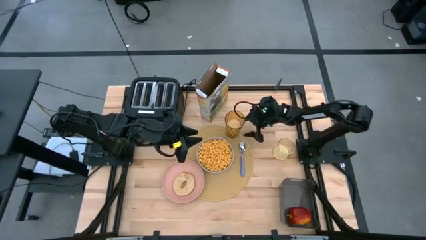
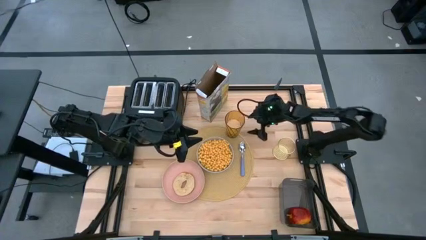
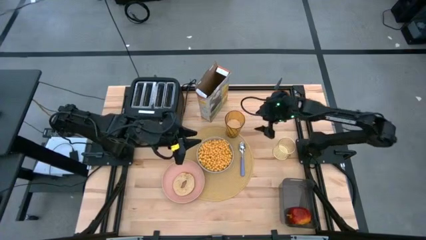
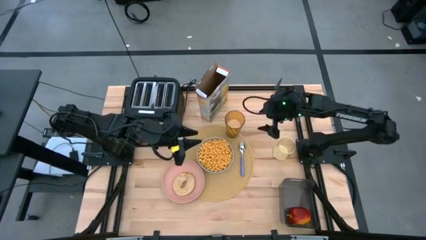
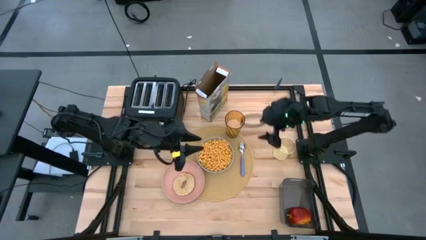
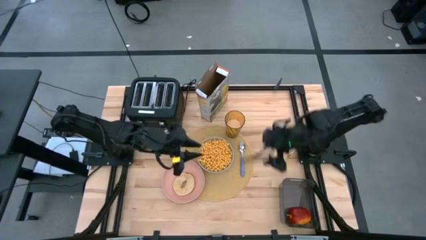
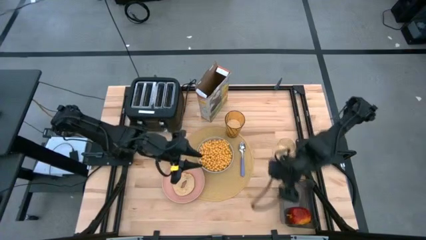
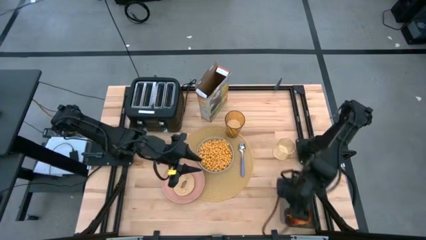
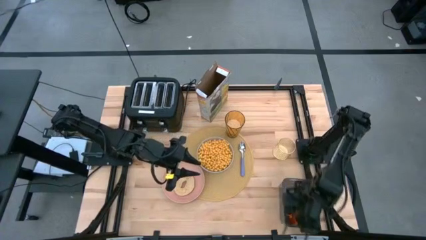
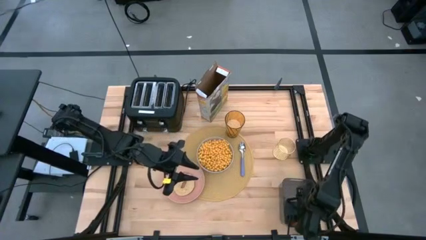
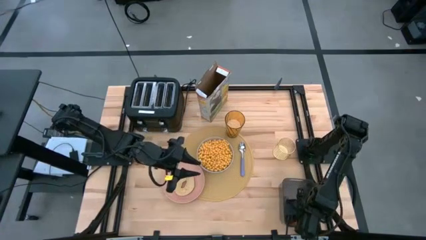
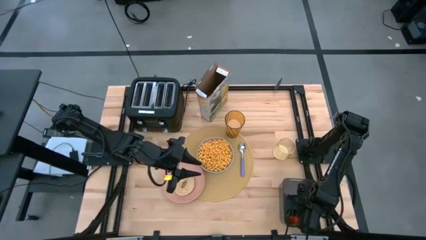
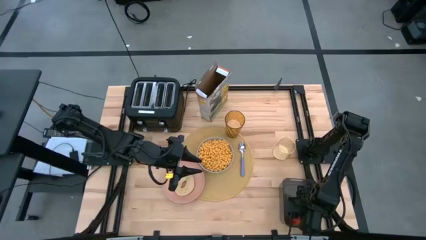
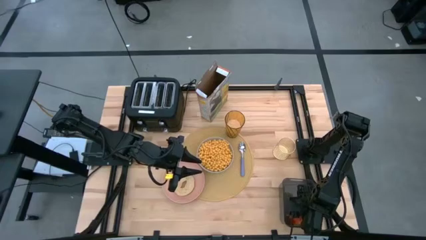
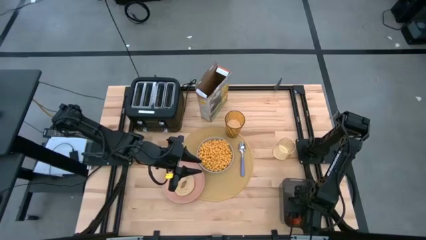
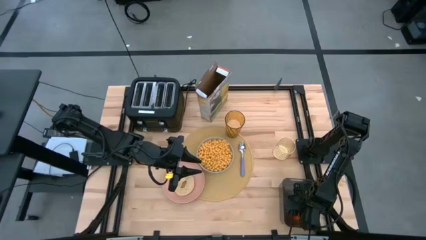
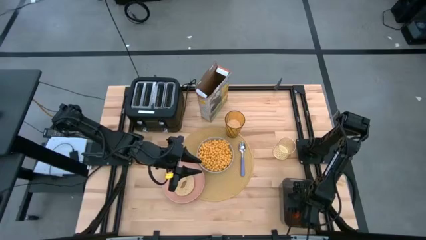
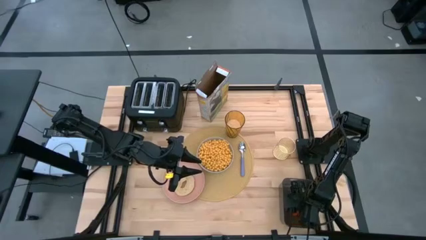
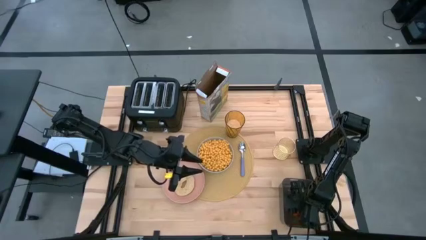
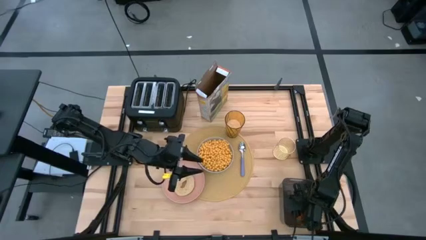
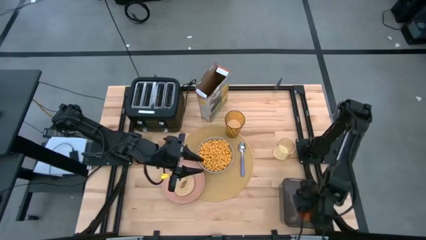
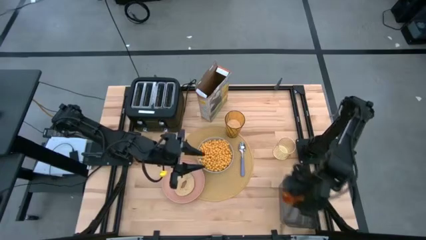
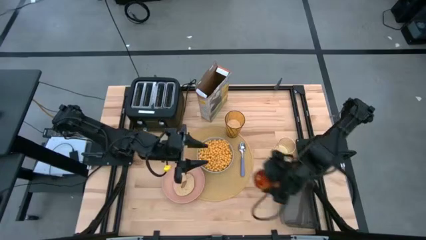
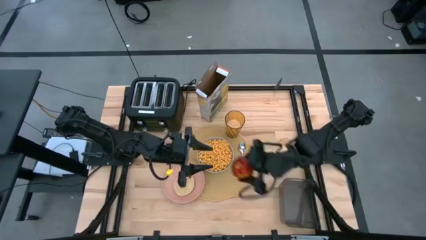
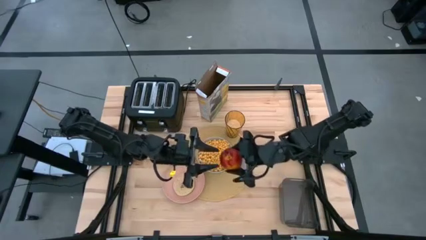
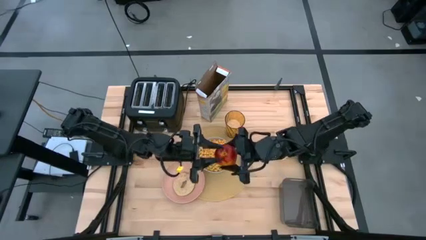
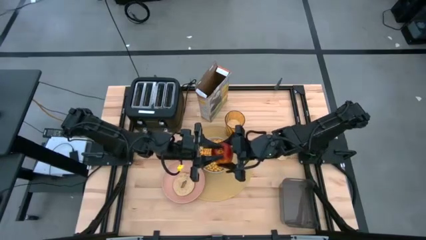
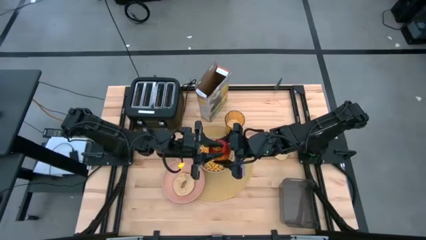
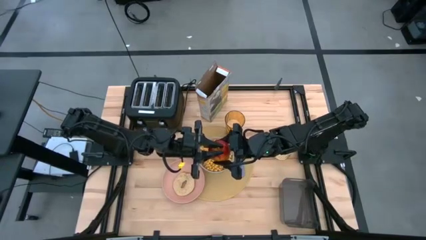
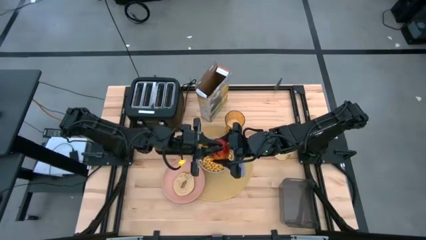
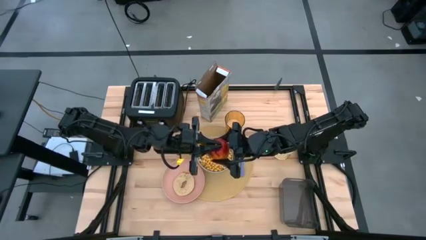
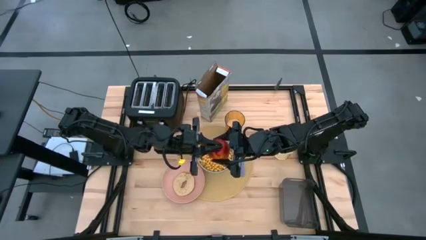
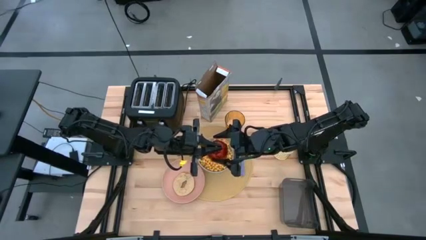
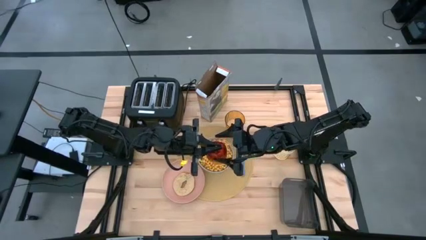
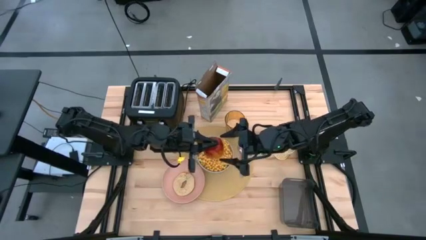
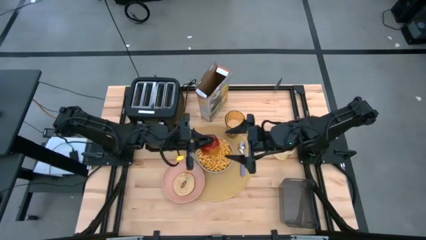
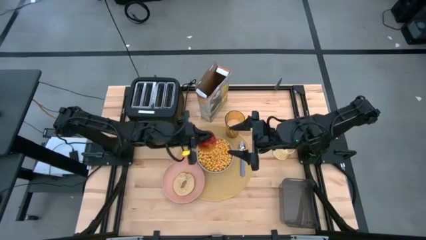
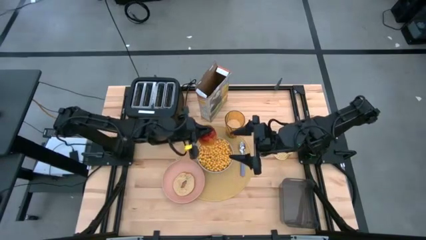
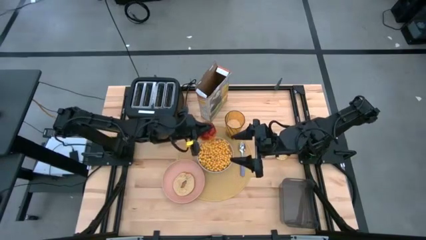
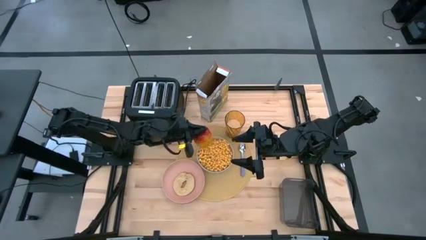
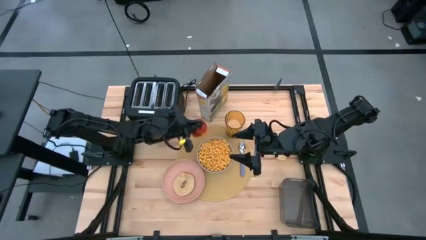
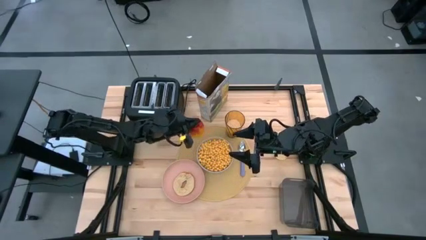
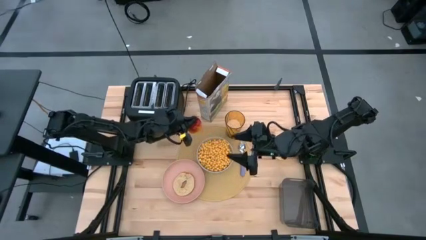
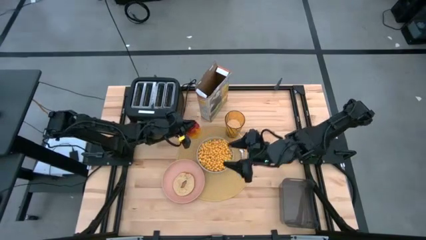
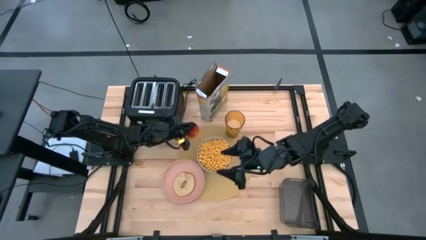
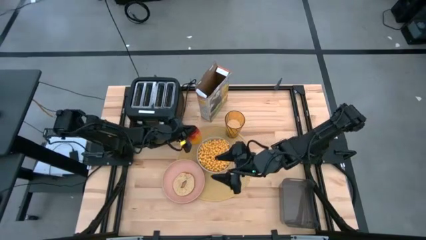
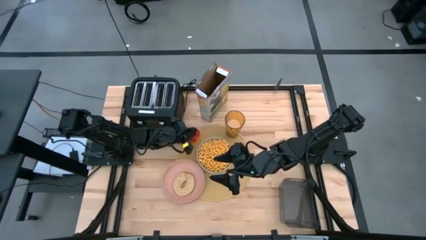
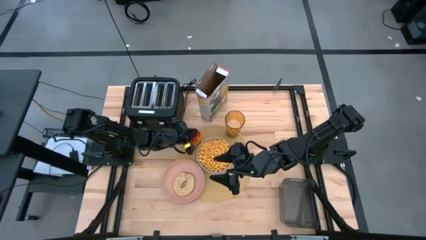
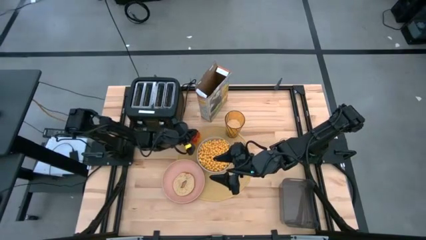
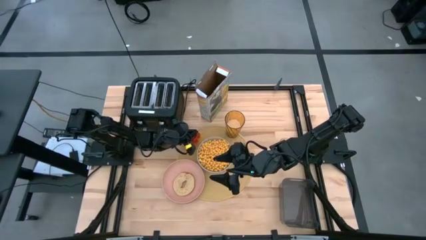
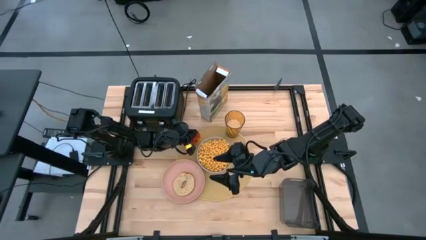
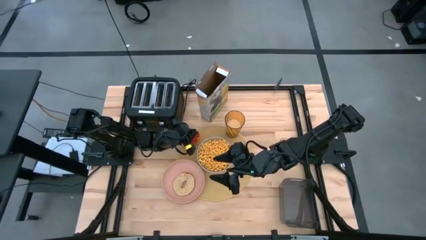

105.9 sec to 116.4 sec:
Task: Arrange a breakfast setting
Put the apple on the brown placemat

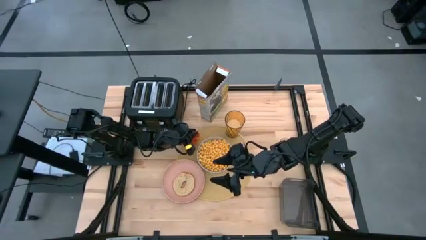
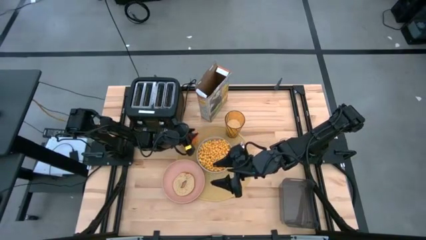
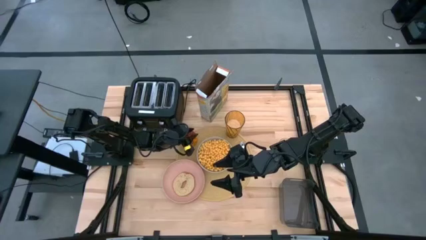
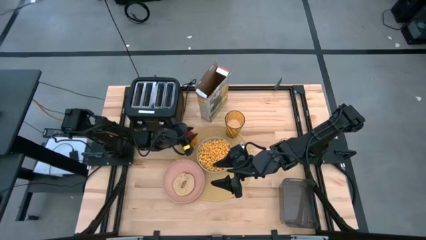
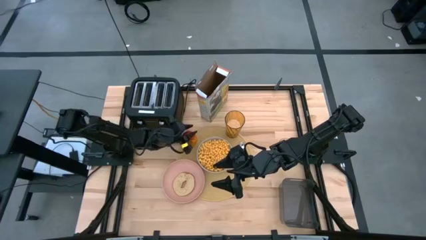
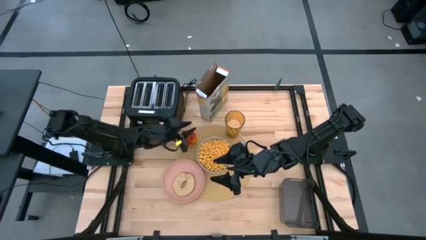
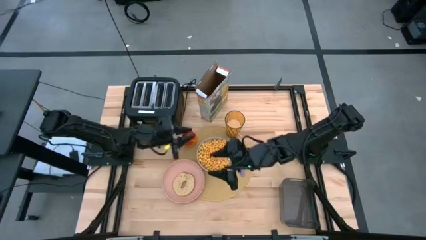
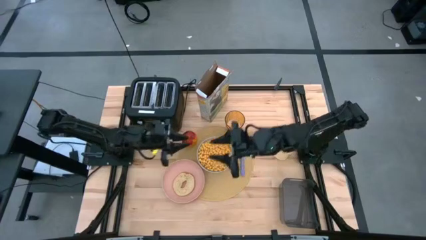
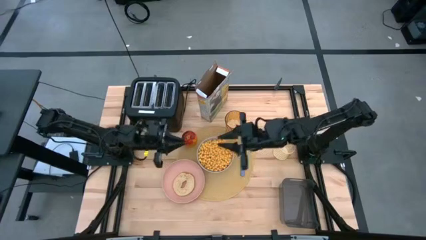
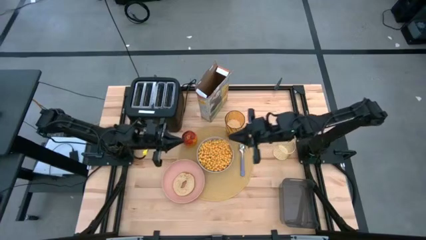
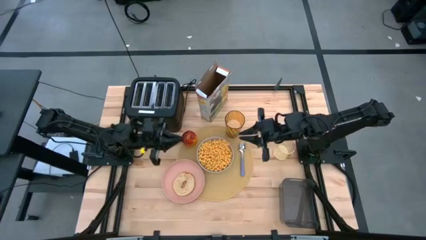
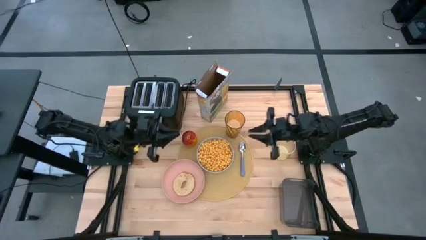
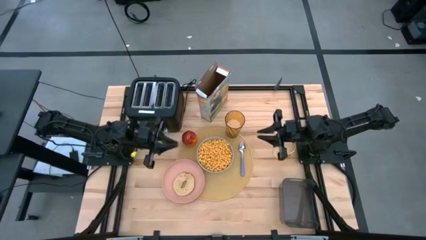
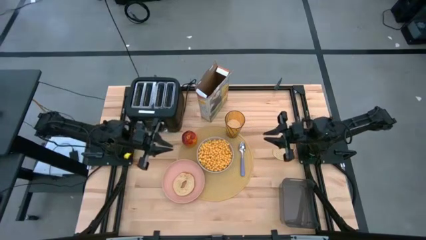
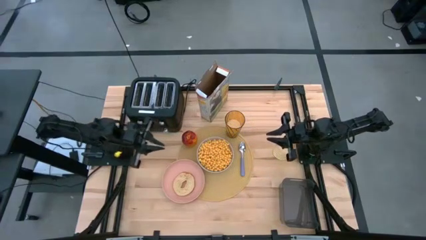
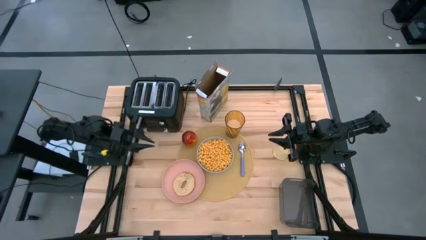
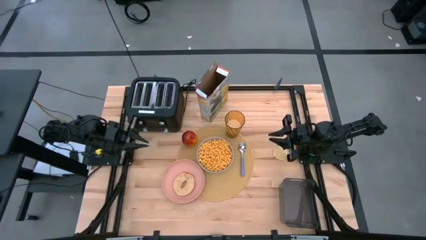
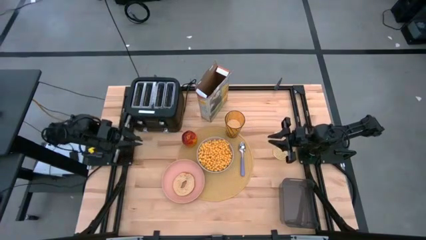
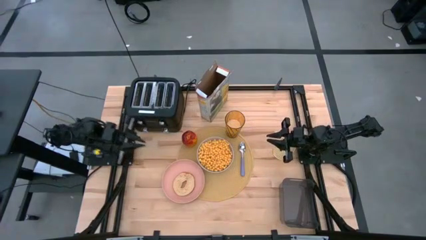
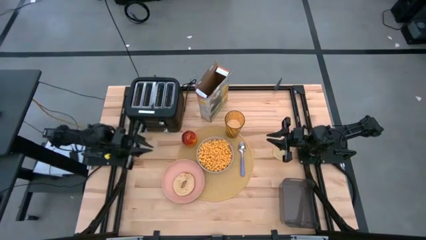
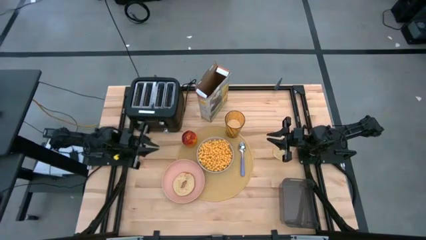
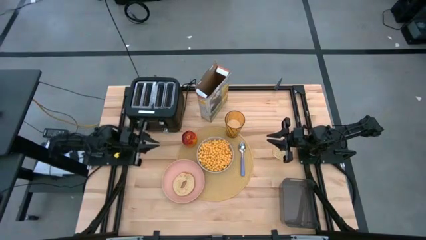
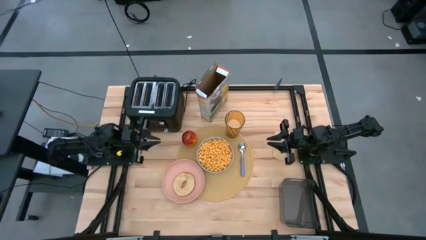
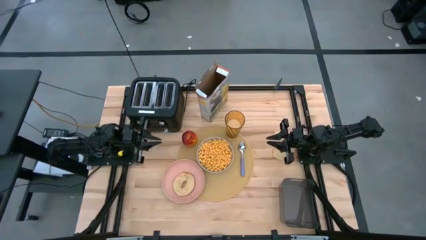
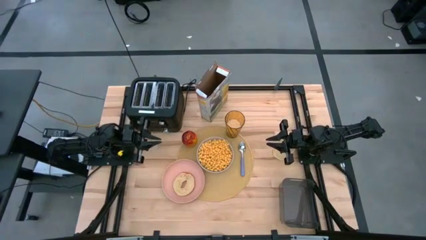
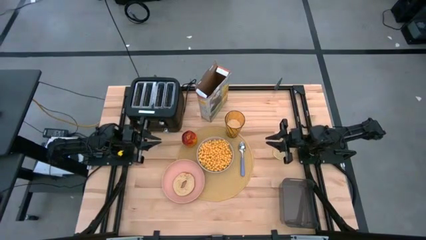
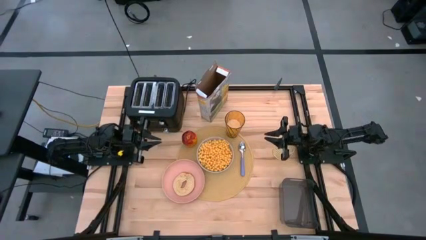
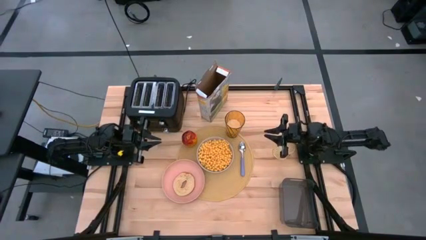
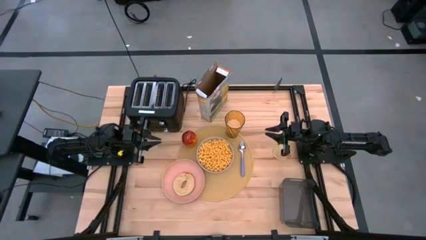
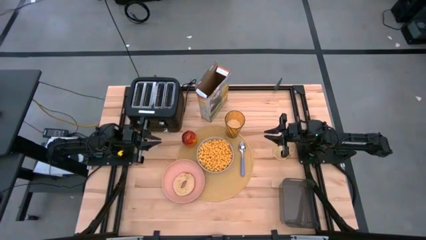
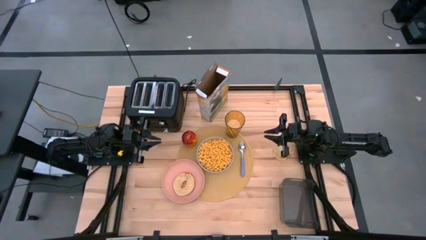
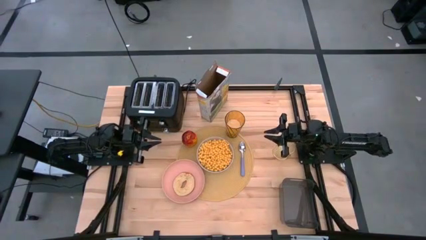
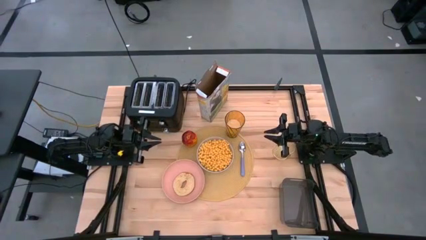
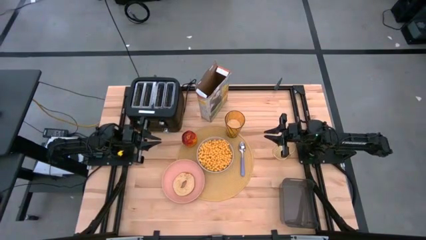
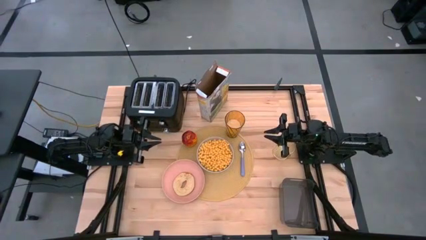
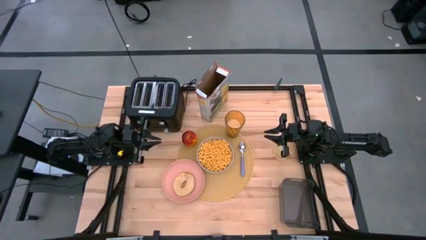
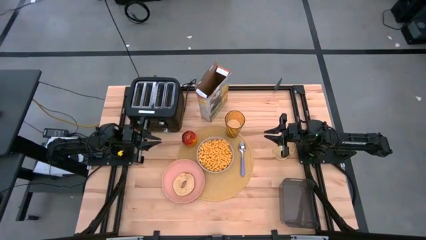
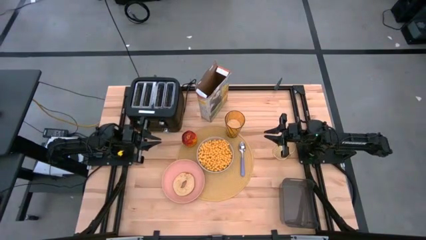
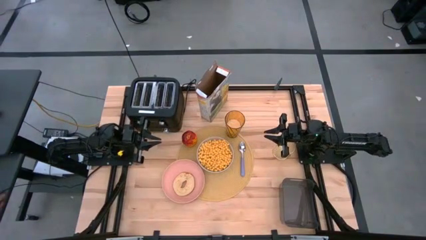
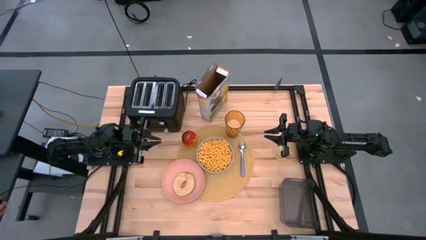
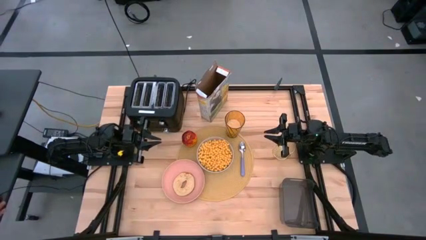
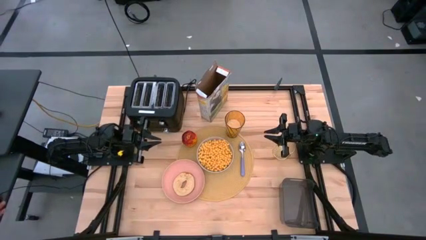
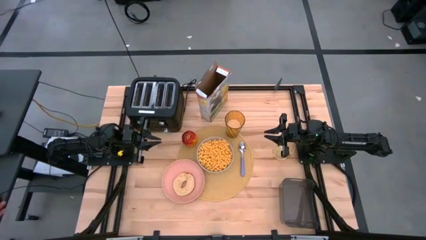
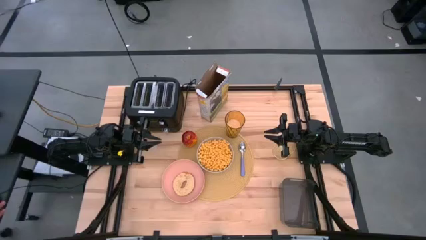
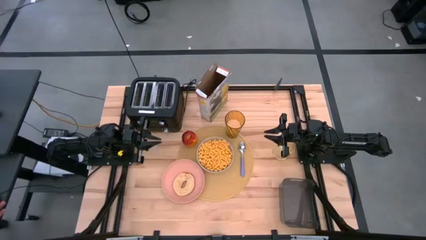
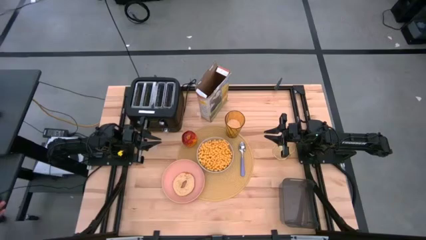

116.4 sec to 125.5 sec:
Return to Home Position
